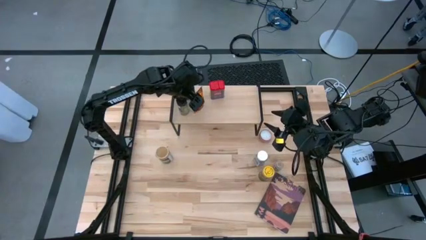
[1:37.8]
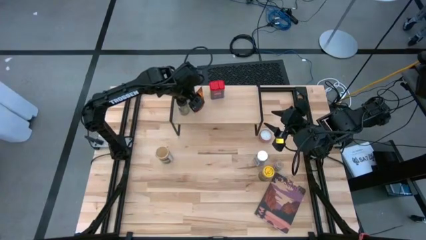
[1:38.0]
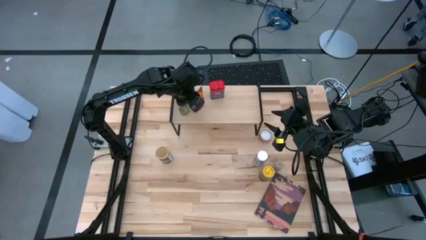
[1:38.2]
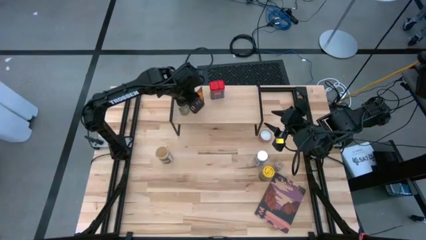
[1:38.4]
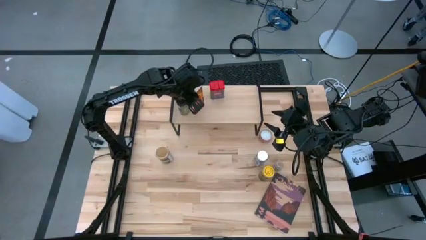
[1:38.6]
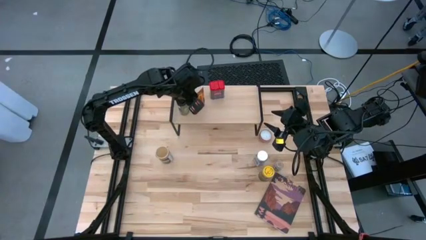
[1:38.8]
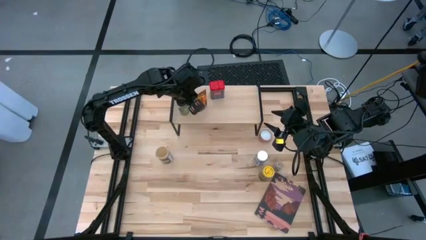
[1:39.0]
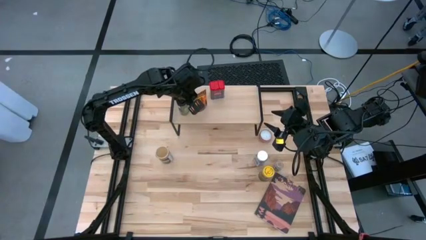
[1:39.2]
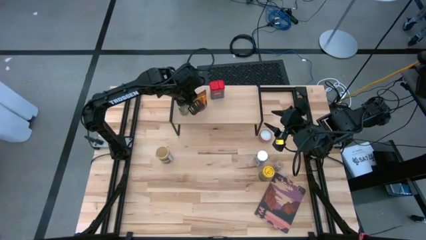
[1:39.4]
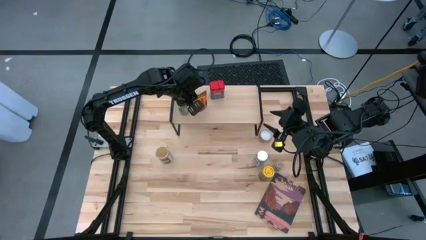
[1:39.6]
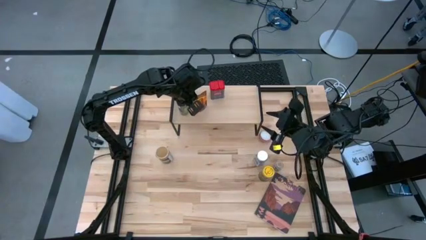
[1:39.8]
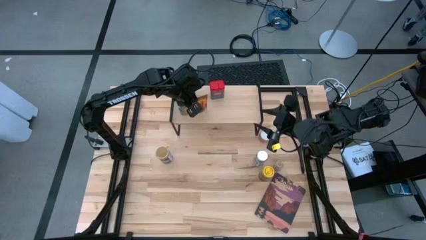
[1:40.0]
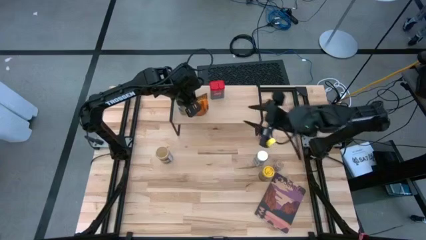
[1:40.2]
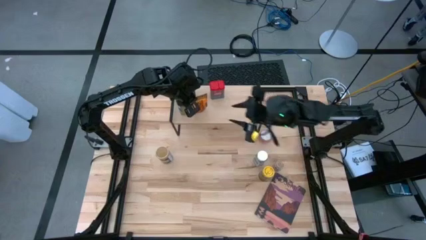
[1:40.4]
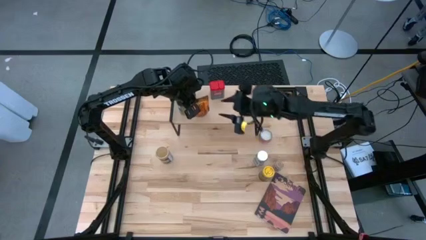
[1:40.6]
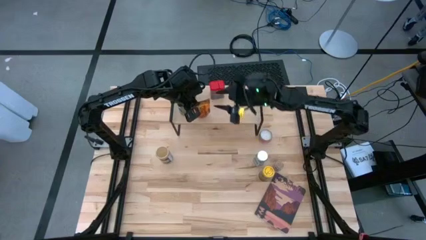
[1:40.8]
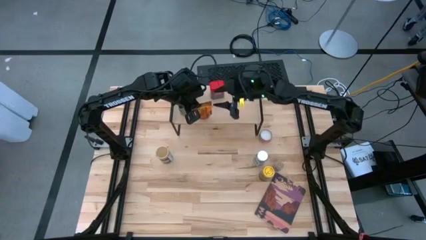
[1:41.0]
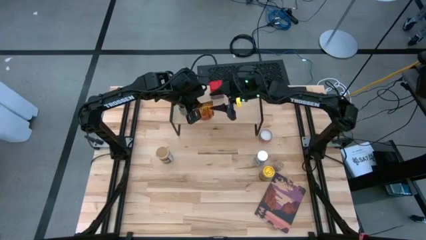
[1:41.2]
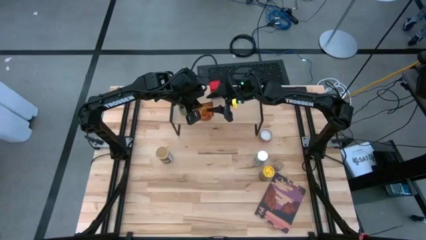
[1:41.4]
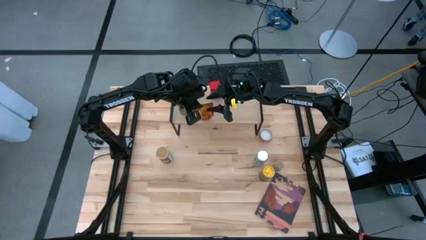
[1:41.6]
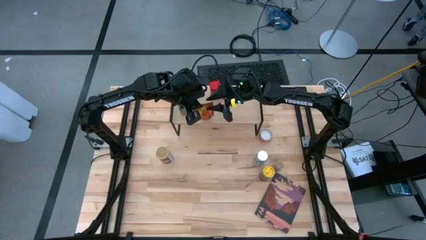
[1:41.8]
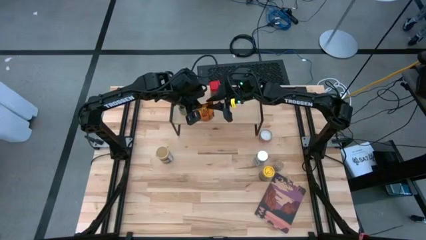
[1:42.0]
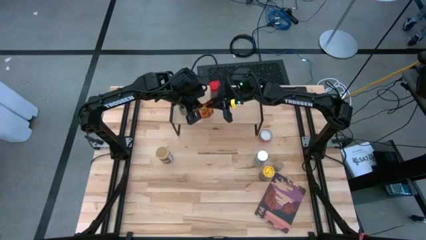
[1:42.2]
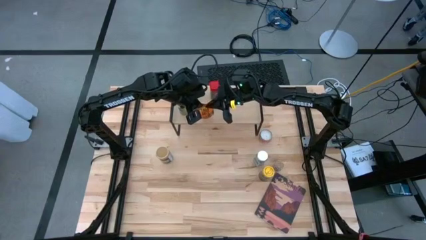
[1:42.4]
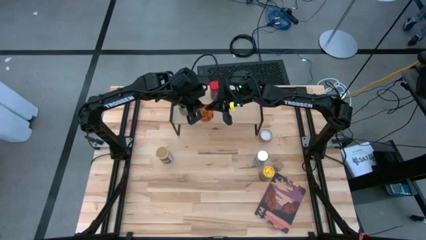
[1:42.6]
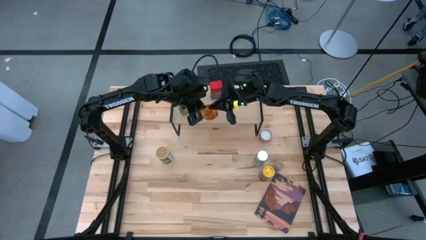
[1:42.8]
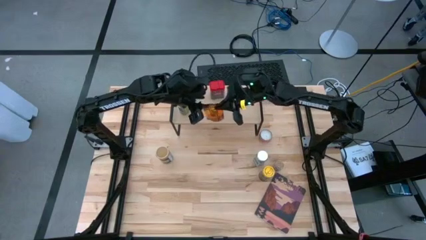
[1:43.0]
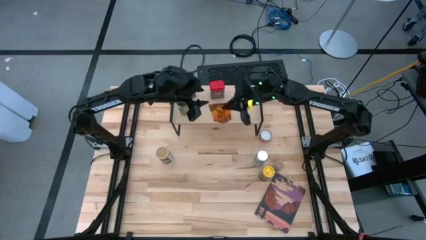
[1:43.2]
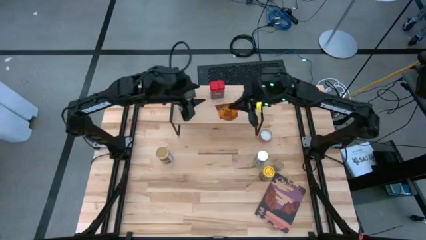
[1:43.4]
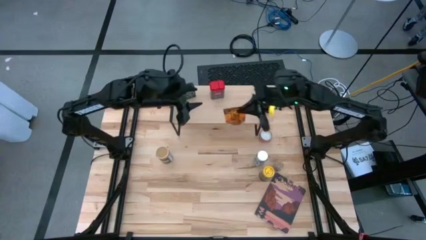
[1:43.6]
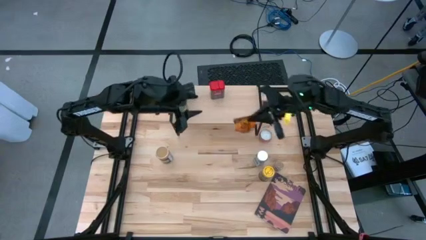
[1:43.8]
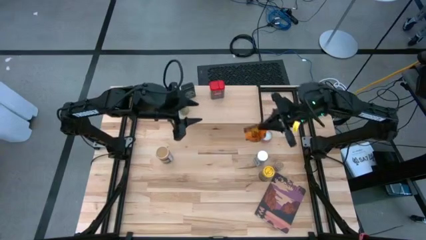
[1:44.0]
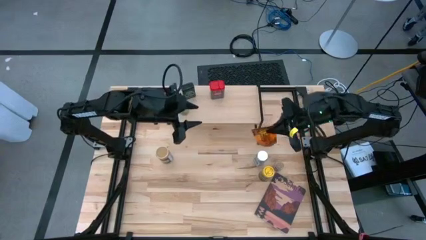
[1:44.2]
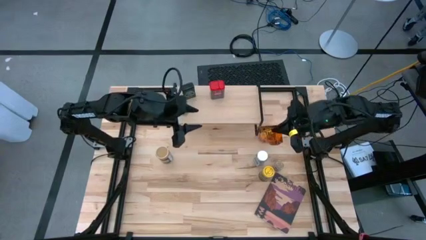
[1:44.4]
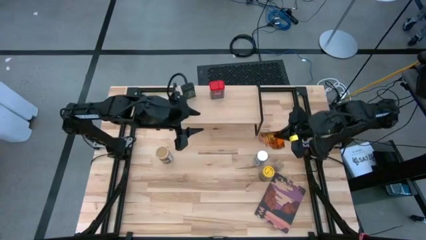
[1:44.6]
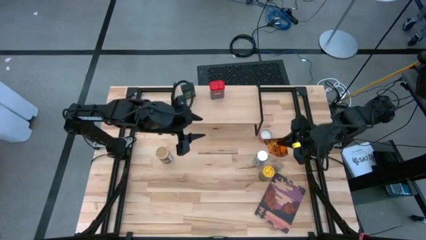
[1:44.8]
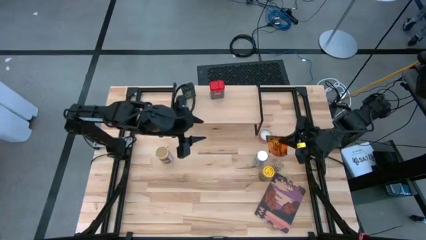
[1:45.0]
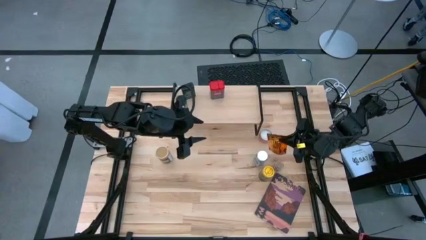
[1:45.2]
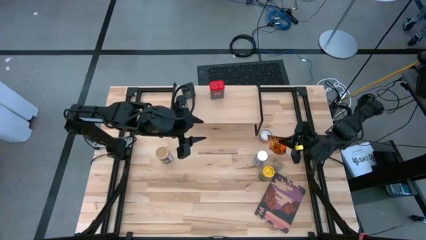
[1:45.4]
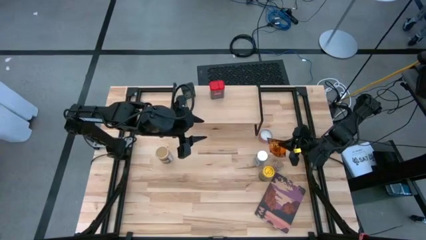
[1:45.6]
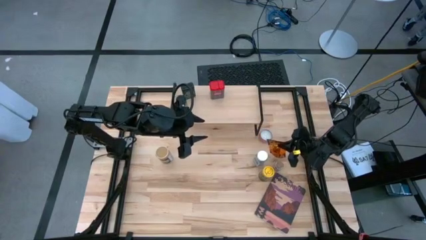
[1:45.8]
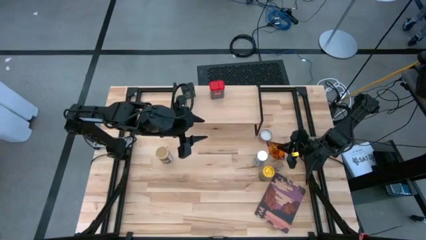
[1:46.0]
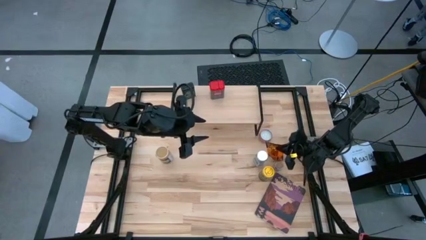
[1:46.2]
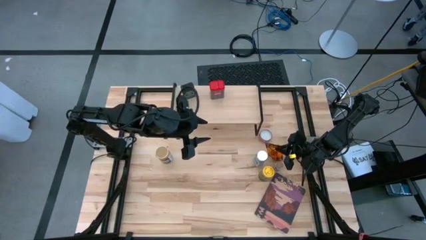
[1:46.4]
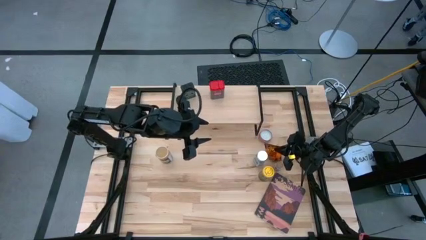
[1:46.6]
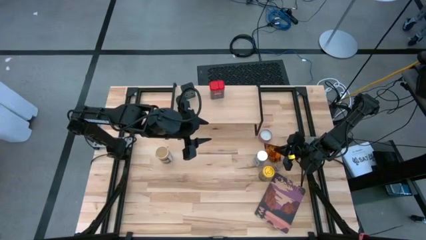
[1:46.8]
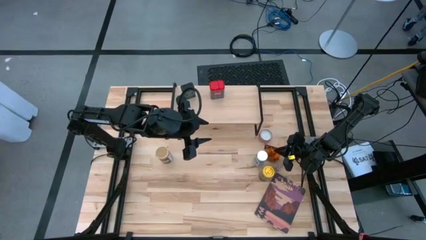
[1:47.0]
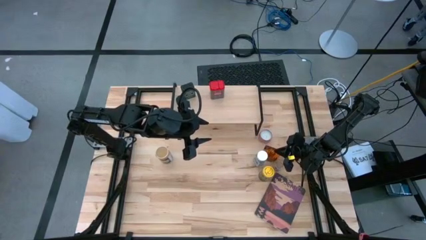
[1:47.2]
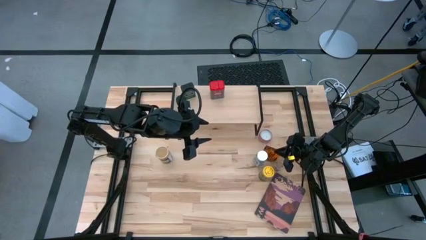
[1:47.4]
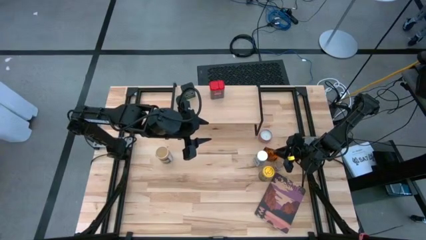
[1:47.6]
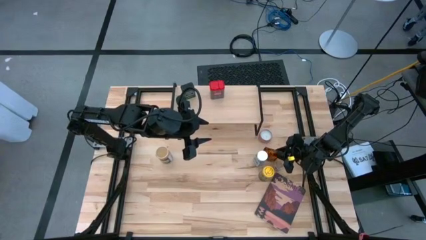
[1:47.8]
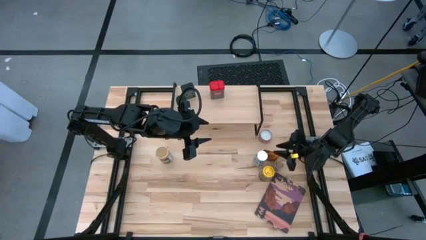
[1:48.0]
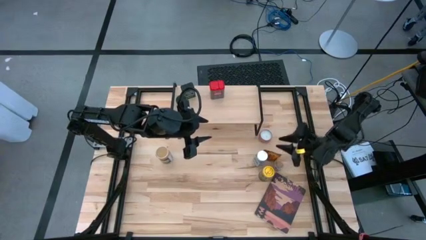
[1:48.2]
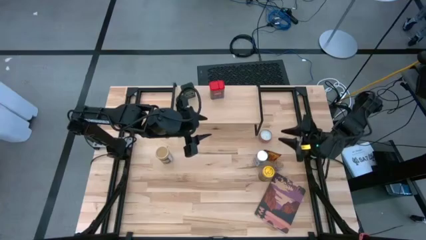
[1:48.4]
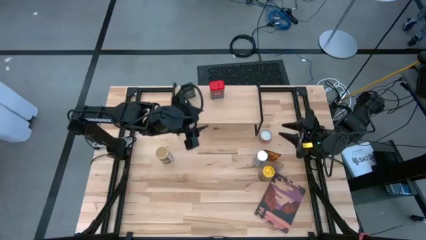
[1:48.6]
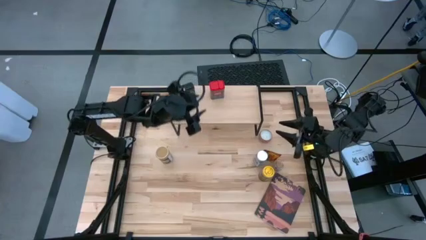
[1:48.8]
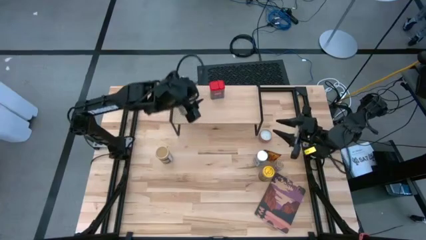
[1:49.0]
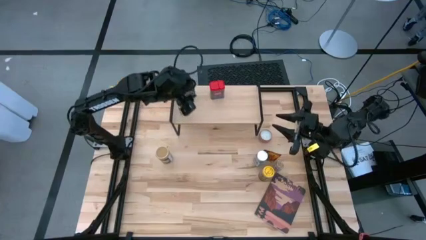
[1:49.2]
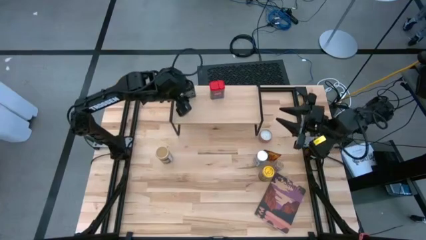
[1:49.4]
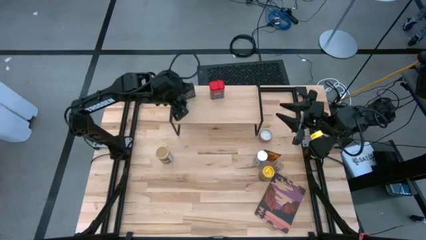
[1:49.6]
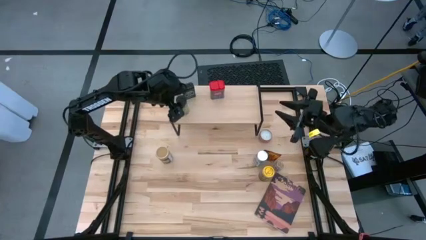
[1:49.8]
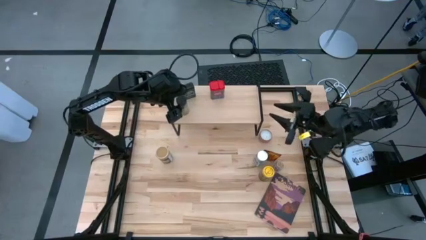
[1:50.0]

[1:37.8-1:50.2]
Task: Shelf spices
Put the orange seasoning bag on the table

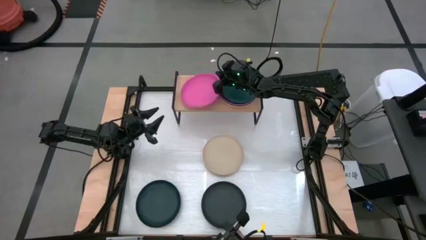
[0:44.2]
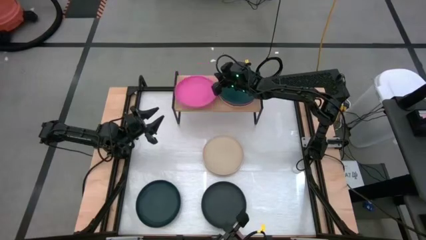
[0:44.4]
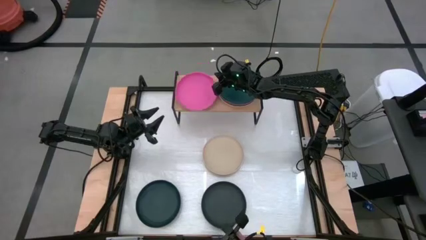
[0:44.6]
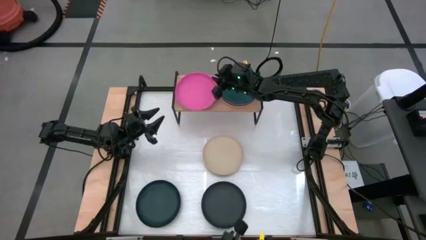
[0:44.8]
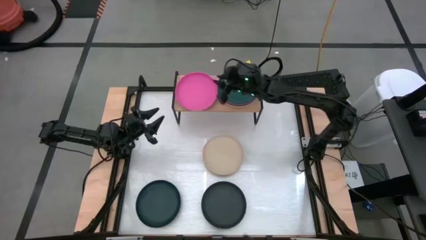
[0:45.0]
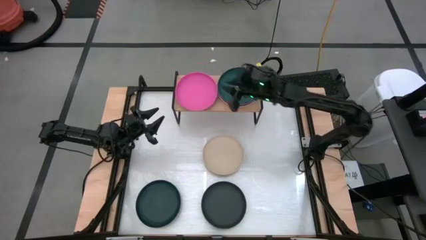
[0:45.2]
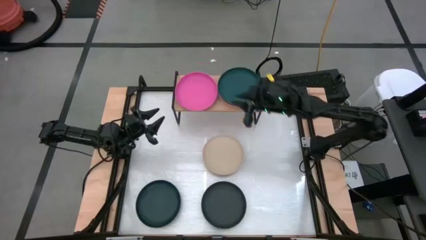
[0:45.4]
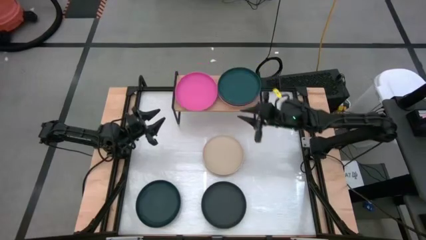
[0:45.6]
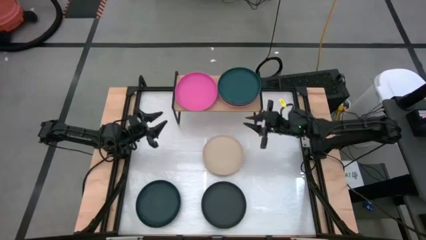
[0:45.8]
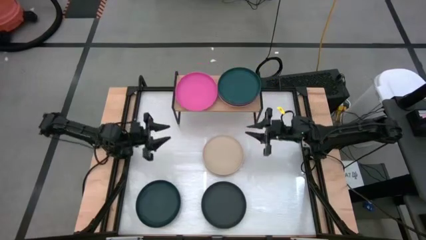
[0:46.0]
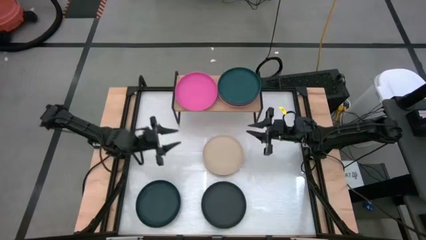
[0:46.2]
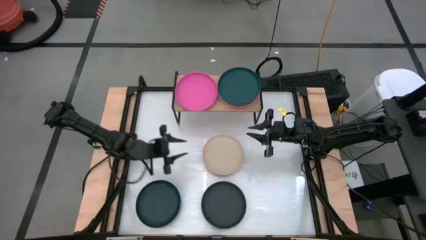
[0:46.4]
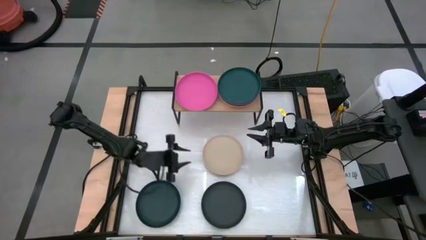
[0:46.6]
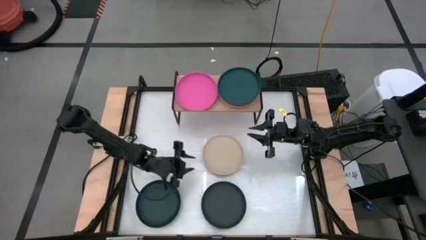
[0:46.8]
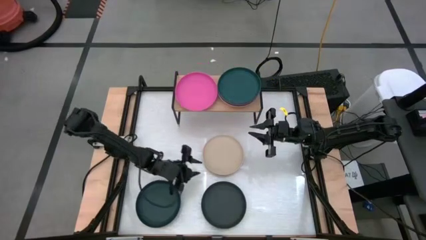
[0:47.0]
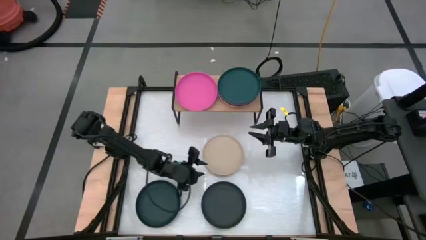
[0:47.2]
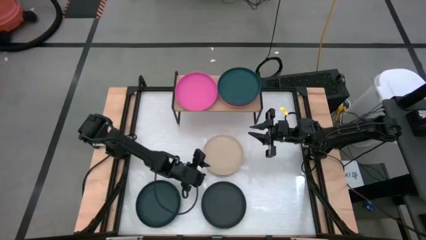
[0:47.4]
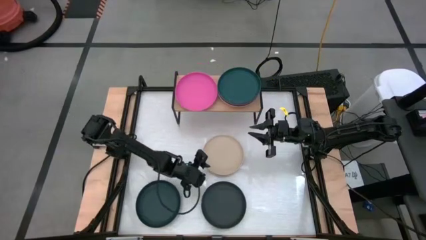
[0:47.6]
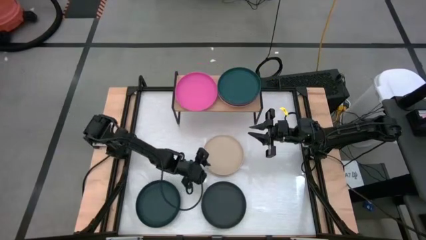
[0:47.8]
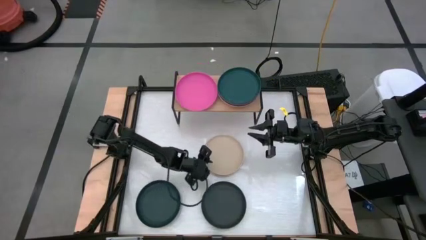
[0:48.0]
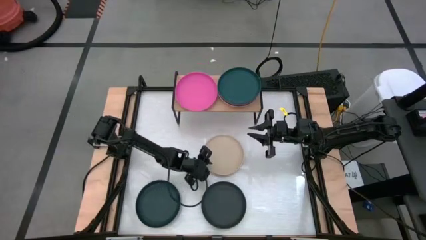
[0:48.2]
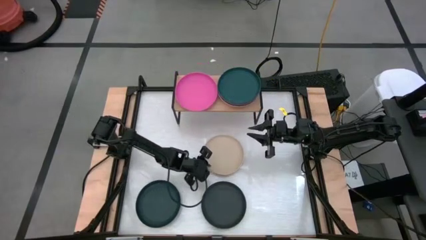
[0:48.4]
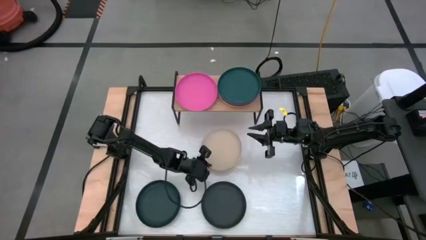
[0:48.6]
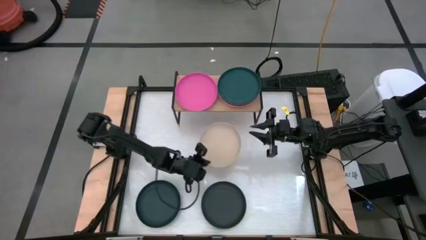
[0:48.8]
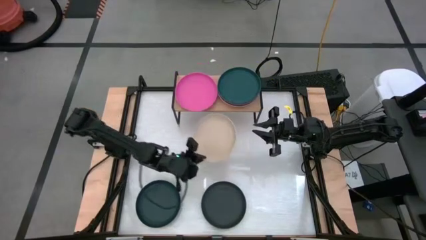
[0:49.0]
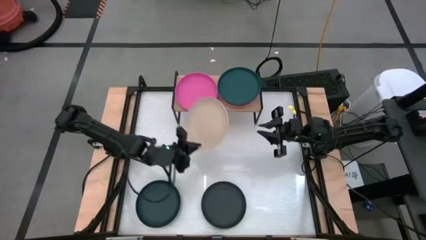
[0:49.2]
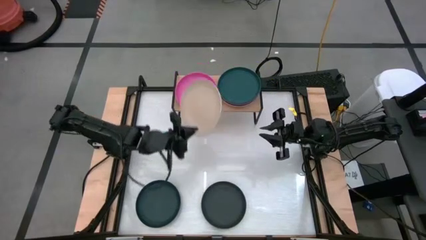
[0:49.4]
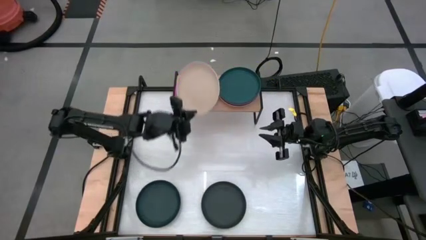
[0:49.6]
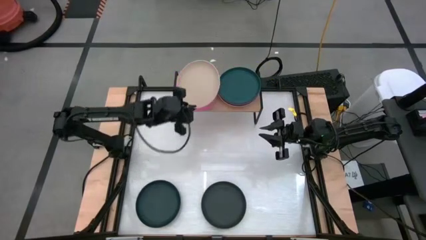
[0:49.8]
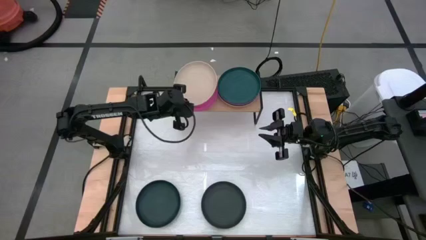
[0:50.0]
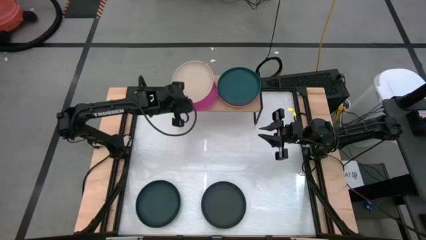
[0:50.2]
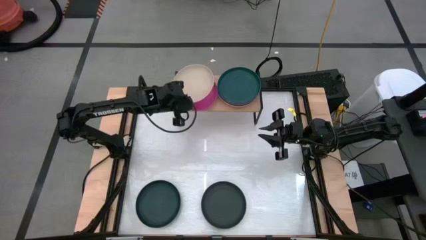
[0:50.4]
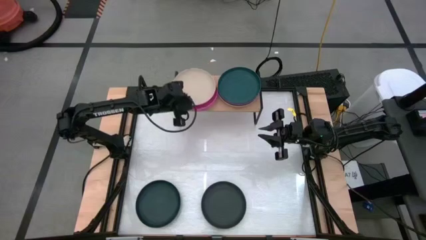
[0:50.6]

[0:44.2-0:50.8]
Task: Place and stack plates onto a shelf
Stack the white plate on top of the pink plate on the shelf
